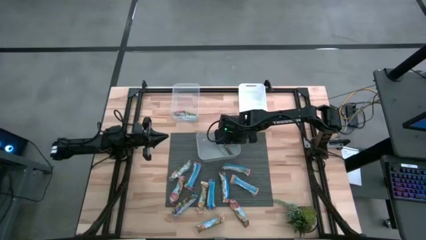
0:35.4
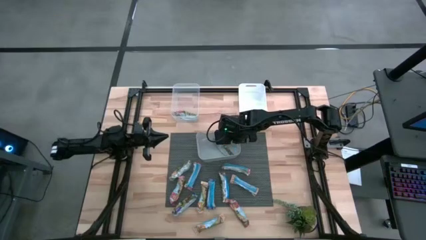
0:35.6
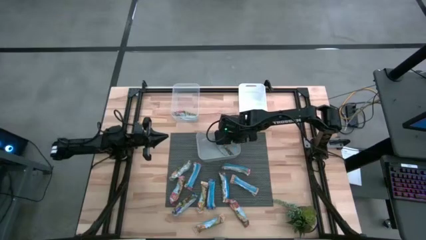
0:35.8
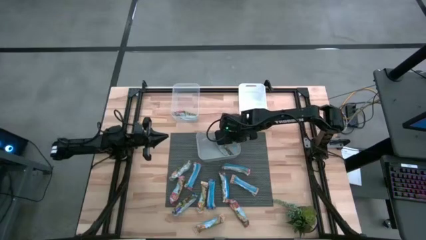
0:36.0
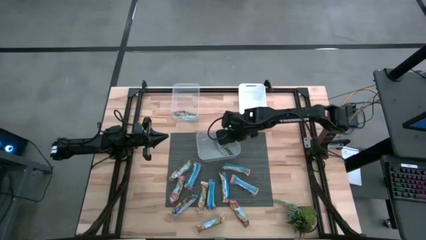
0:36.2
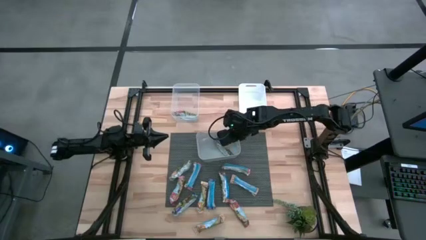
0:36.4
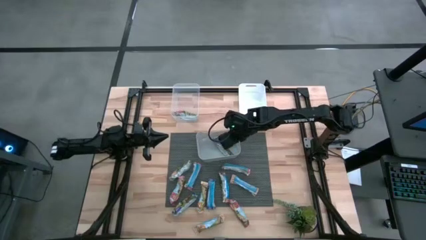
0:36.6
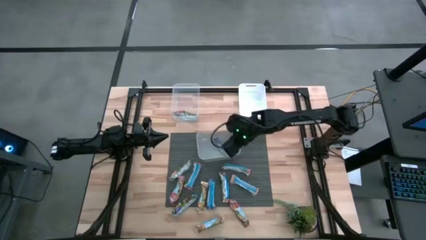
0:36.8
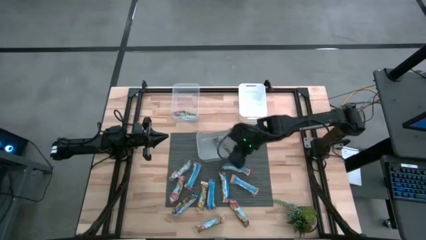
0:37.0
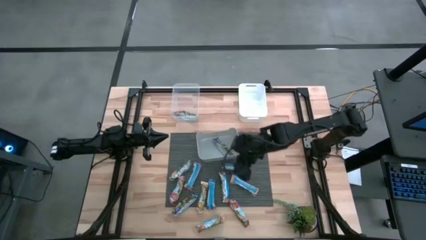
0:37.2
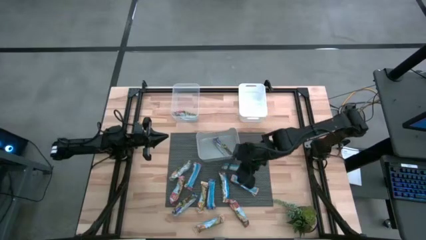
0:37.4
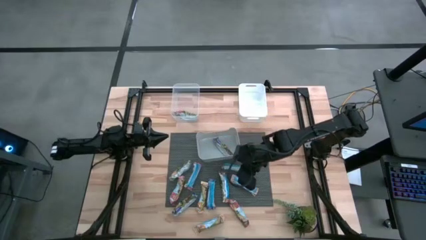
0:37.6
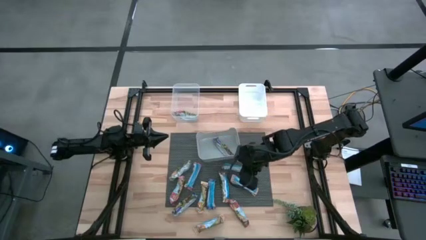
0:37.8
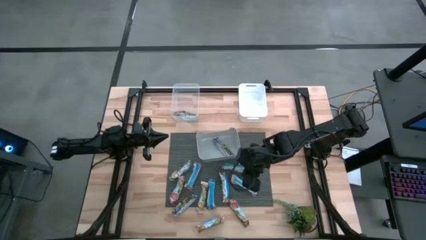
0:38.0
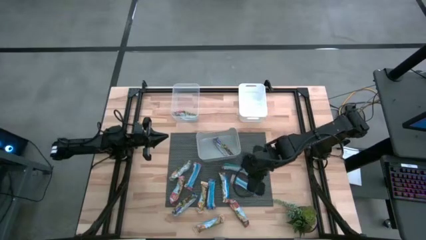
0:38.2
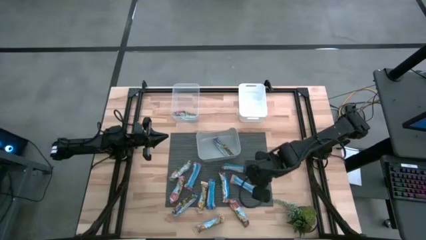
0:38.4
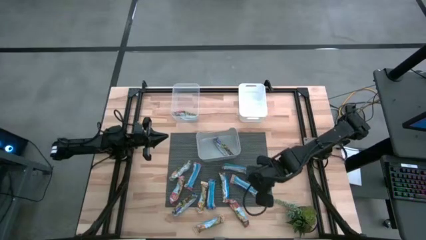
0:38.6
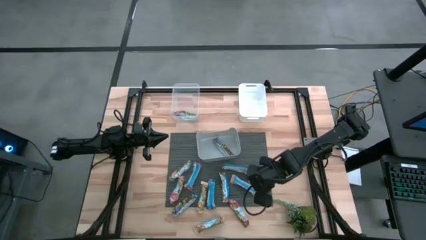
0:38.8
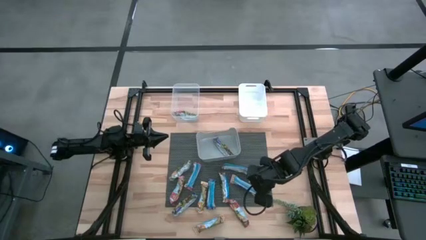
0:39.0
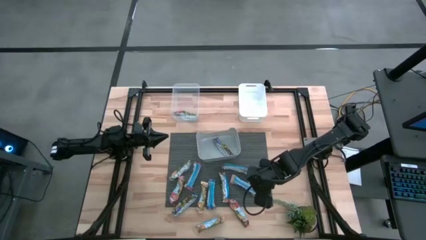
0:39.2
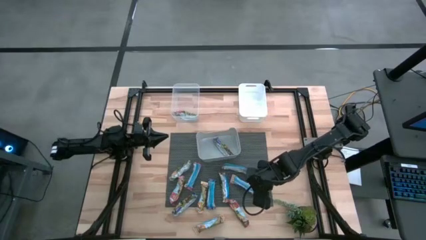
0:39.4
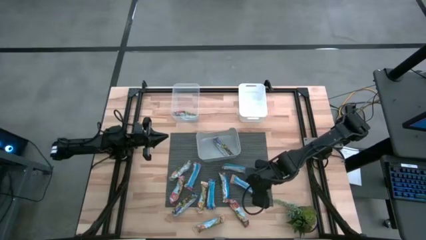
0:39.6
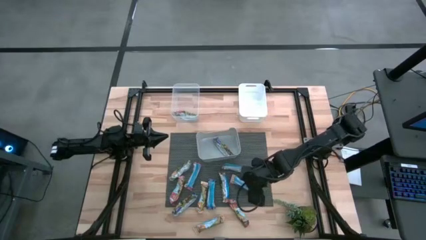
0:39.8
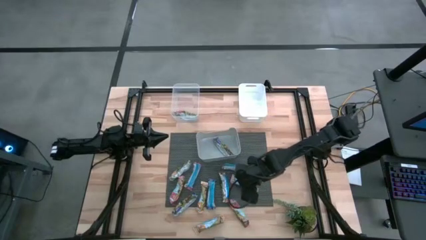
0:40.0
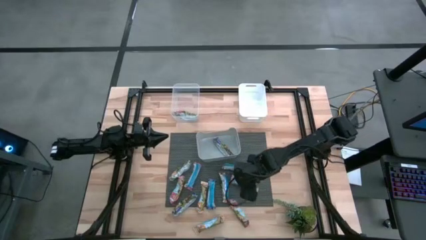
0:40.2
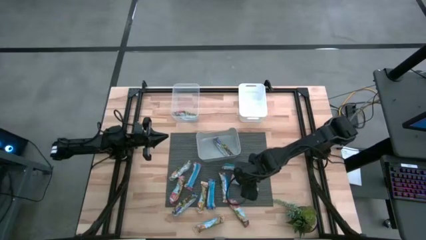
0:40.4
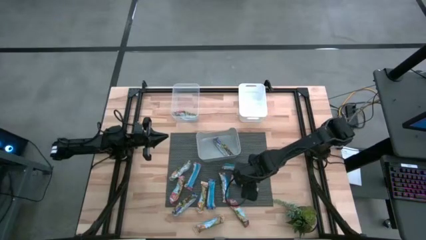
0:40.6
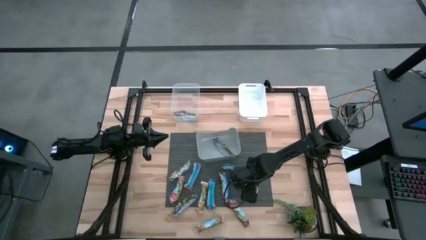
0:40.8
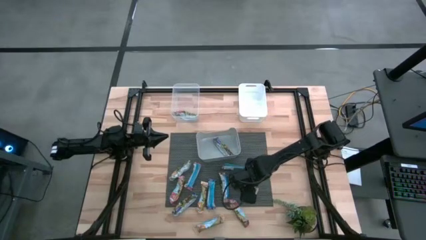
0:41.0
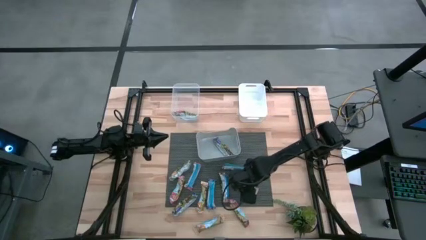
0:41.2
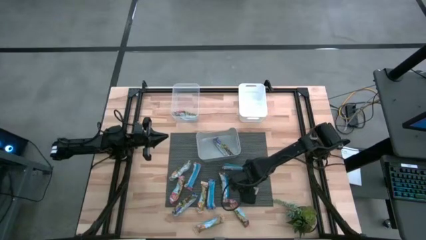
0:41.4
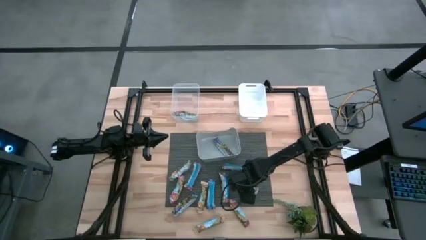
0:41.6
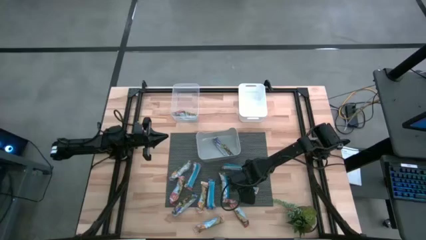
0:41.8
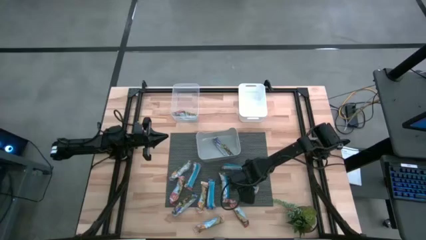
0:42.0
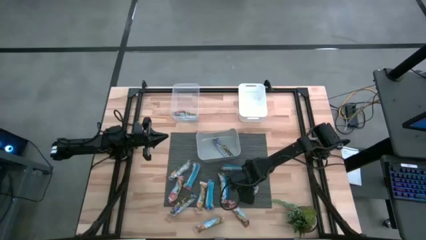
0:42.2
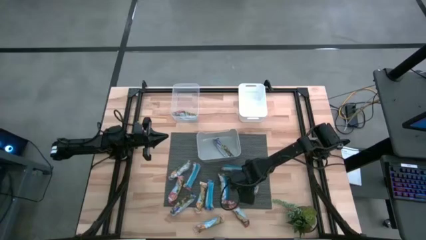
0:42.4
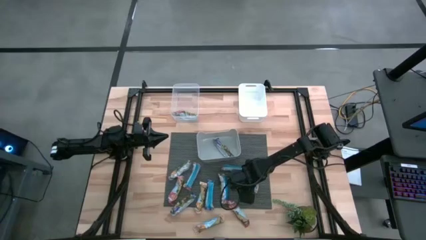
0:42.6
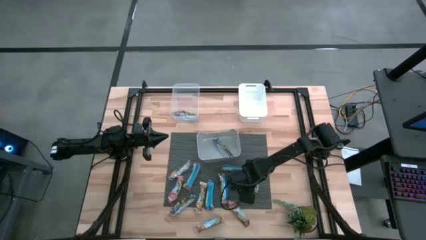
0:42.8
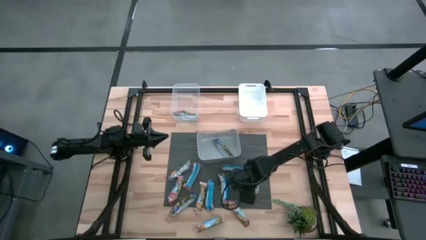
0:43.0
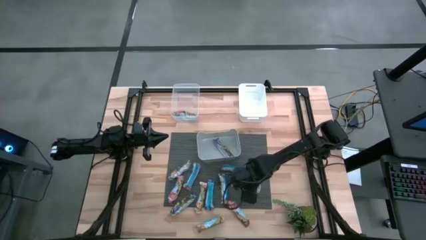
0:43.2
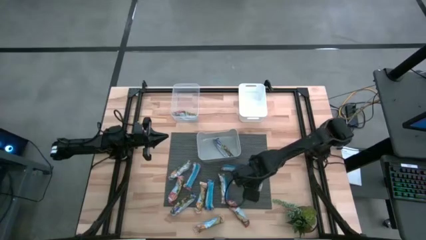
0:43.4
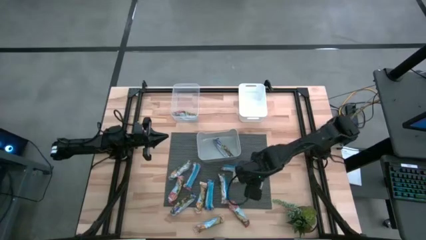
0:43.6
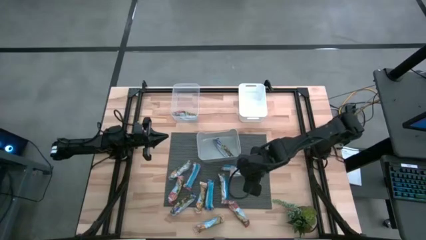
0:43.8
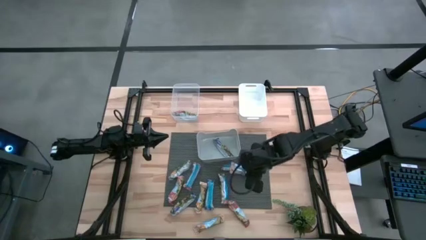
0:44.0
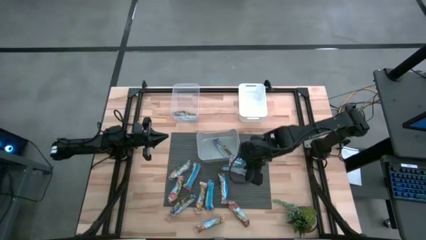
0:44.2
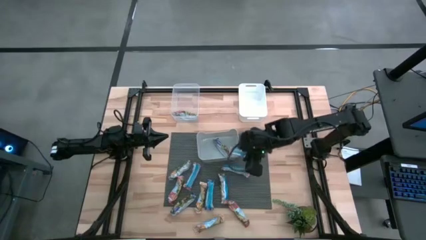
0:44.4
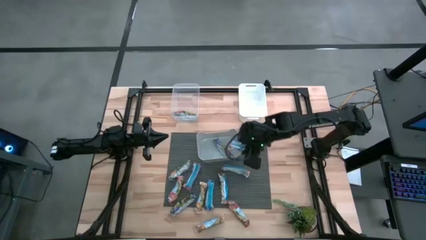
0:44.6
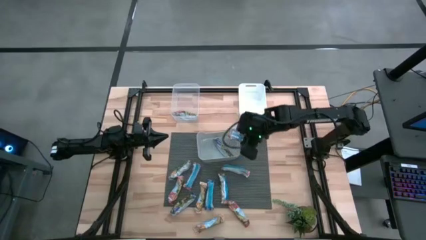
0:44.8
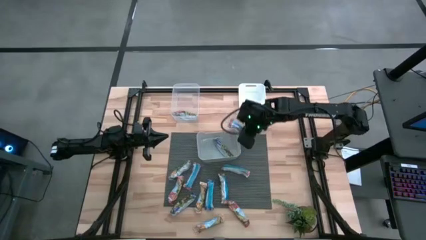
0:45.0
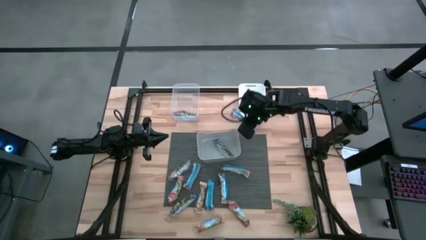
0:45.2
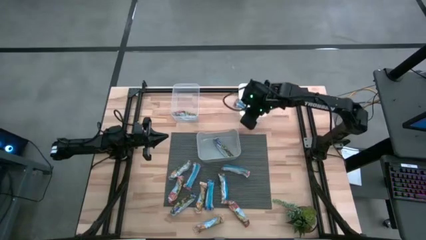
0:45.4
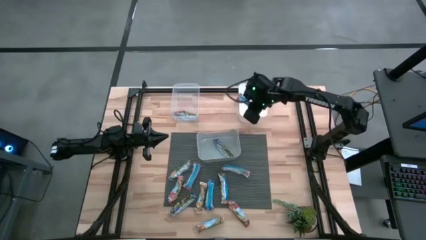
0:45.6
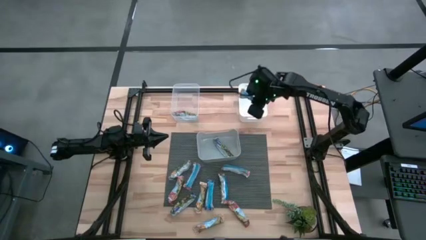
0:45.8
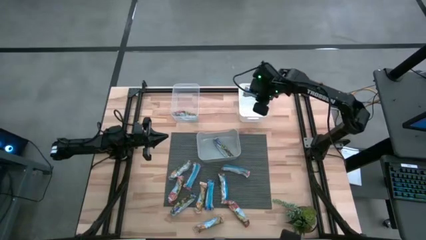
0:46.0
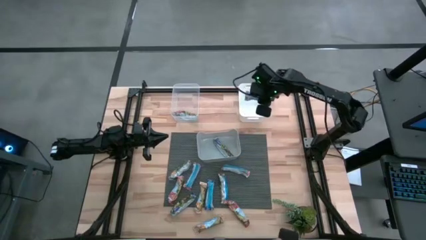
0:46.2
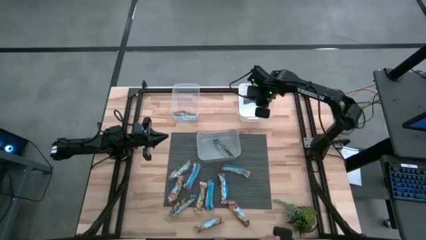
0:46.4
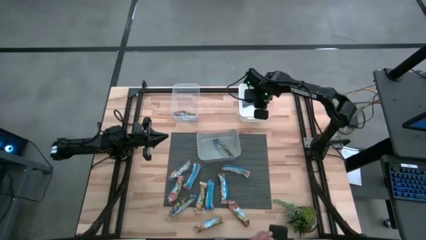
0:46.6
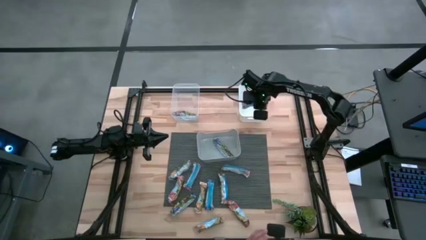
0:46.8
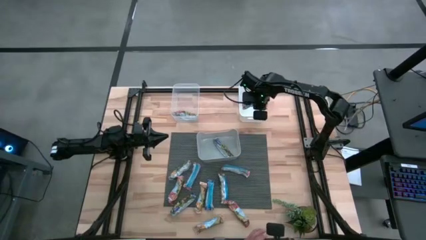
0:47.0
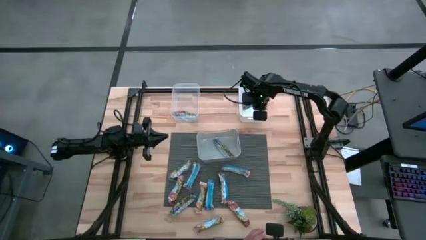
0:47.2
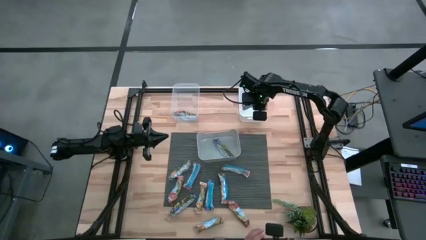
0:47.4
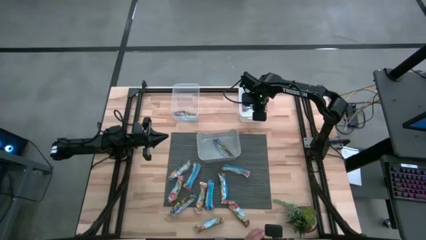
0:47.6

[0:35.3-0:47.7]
Task: Pick and place Granola Bars by type
Put the yellow granola bar into the white bin

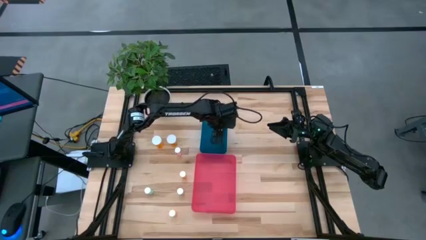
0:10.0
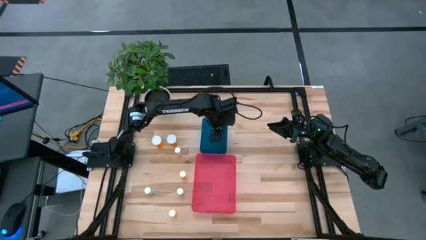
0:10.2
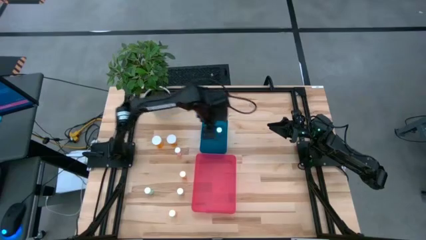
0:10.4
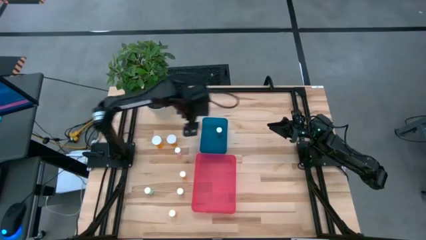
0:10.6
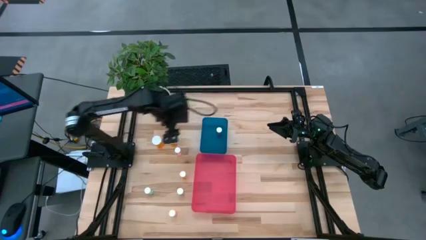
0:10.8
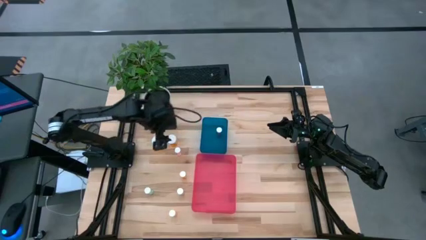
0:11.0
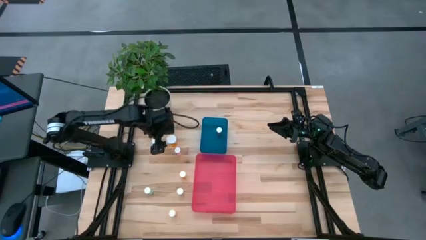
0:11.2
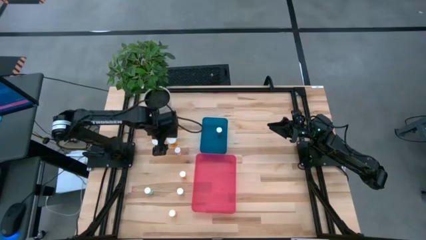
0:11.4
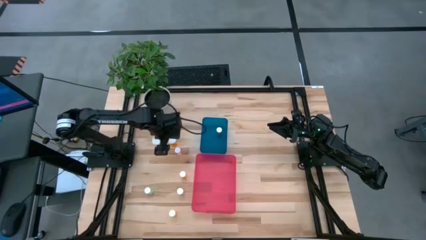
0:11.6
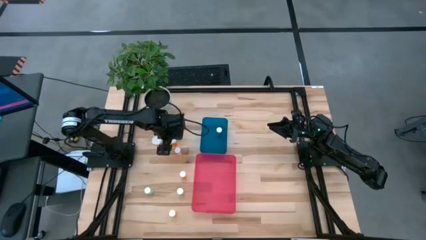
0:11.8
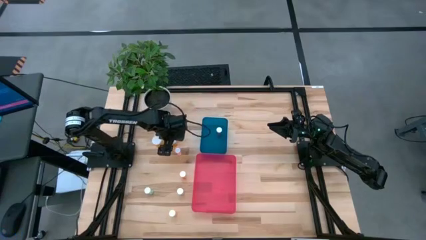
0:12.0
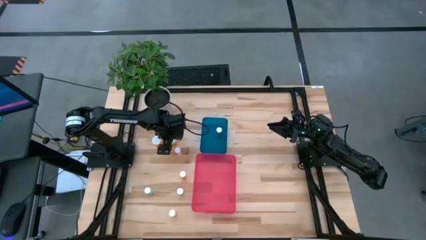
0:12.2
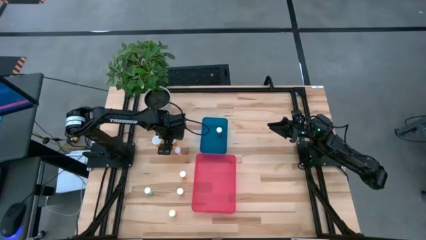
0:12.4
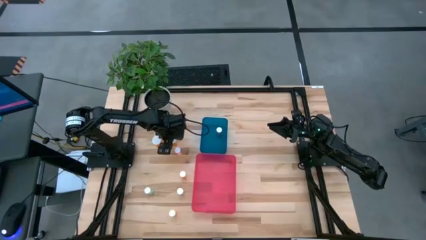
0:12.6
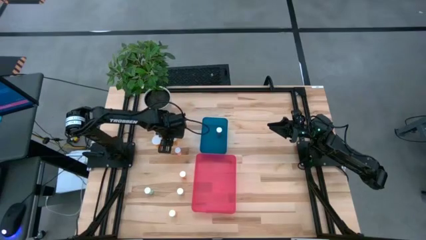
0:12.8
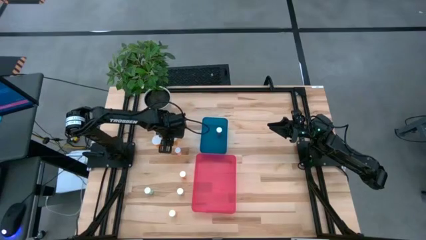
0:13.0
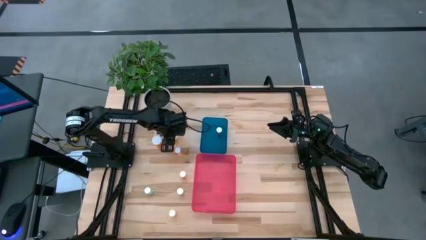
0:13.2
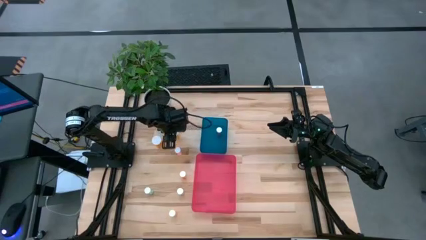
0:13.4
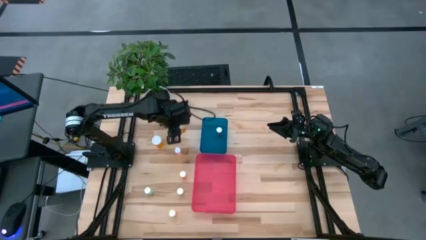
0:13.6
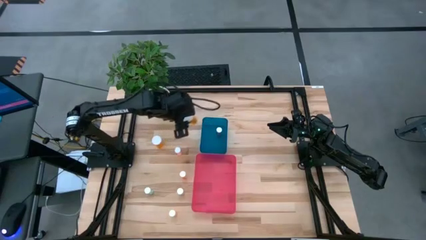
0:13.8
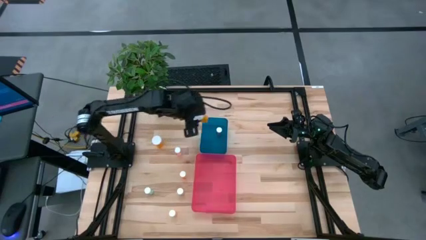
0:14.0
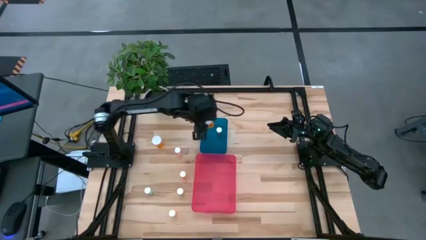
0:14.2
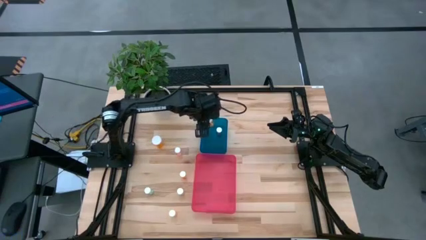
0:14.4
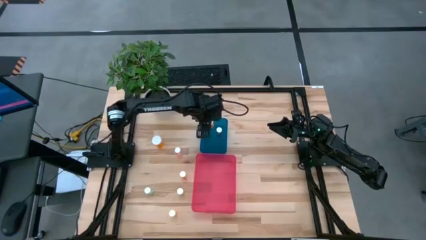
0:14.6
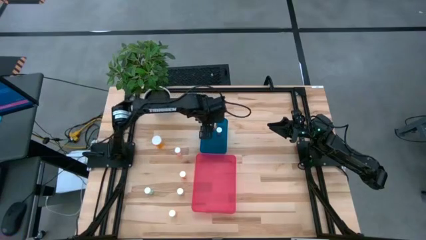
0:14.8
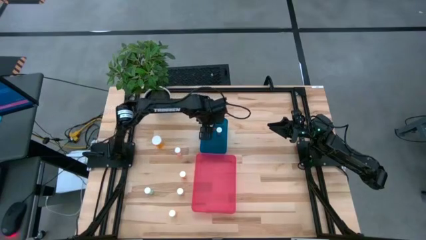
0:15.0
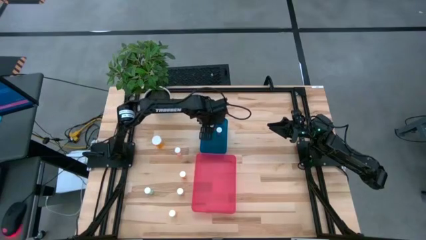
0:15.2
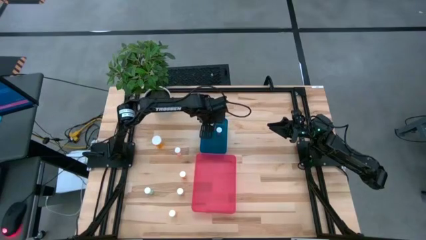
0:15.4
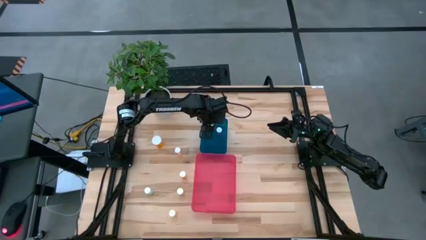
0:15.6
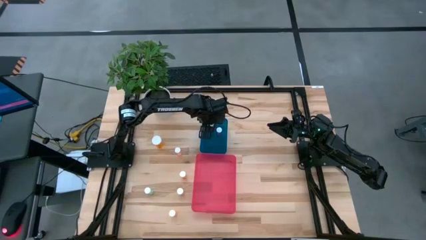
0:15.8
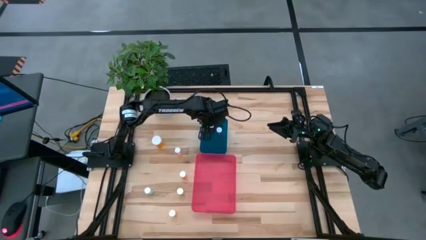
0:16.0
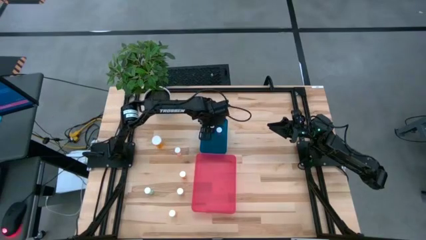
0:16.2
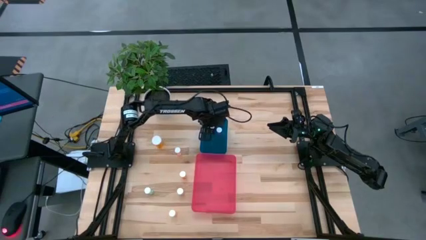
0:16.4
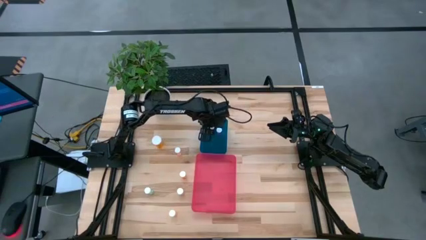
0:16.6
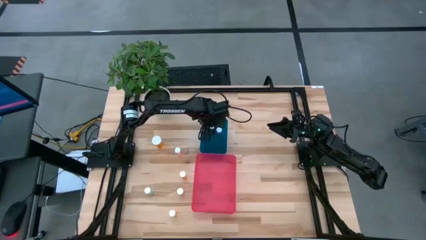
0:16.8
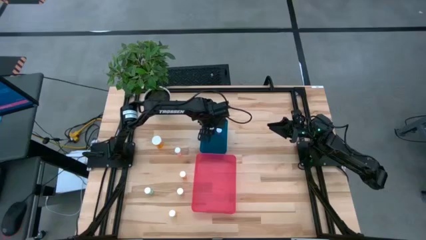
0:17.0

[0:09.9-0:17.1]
Task: Pick and place medicine bottles into bin by pill shape (circle, oval)
Put the large orange capsule bottle into the blue bin
